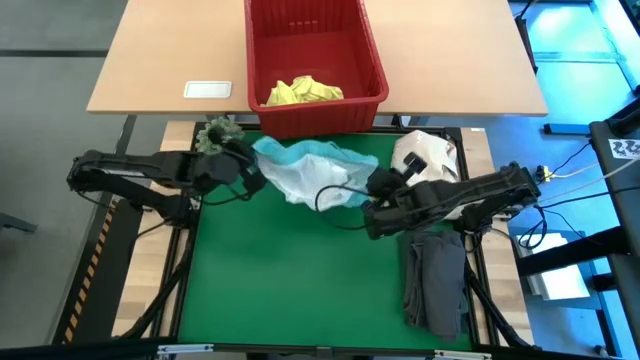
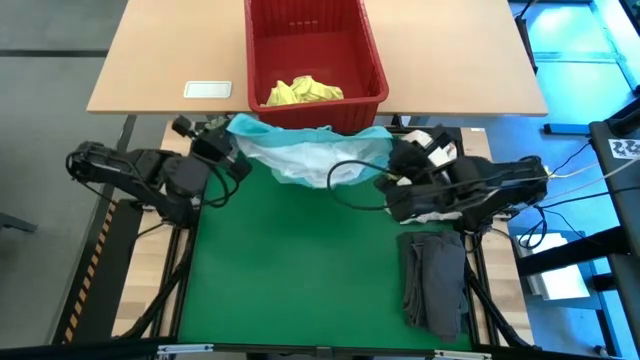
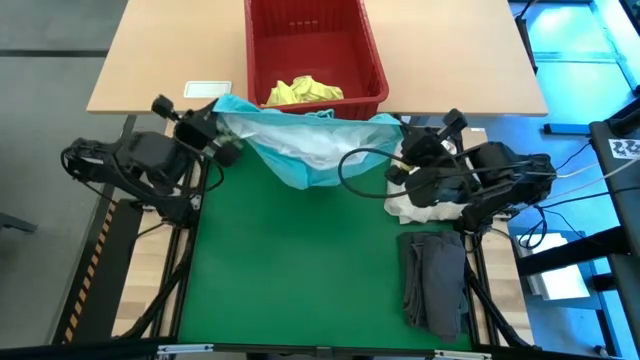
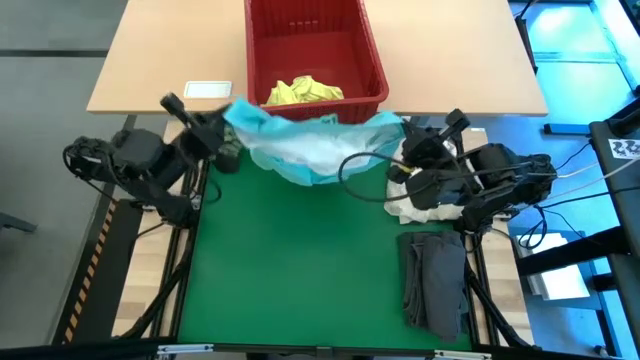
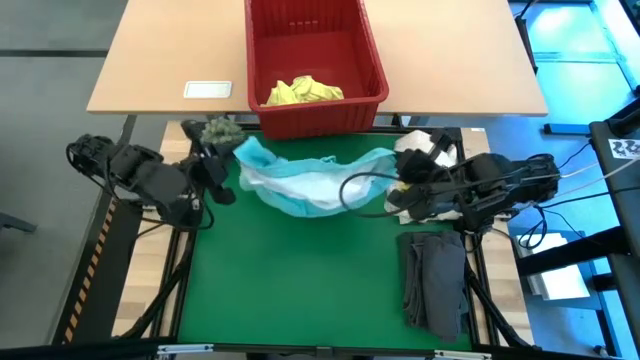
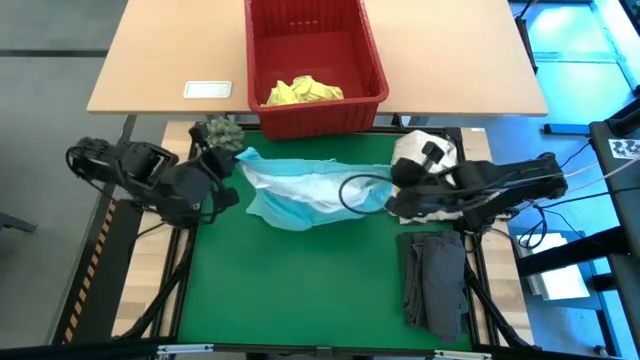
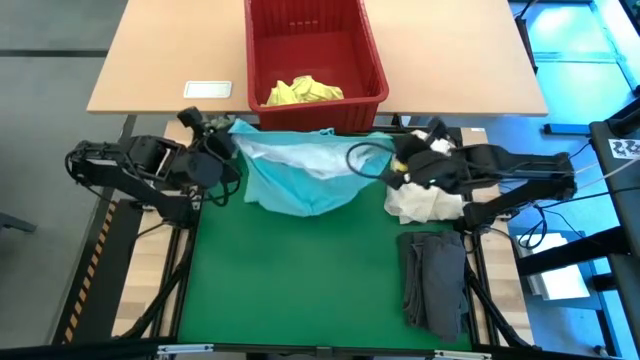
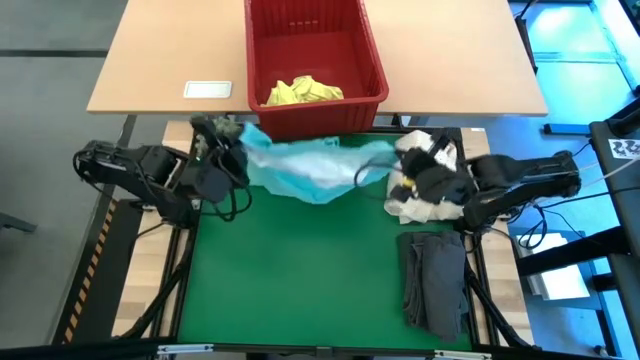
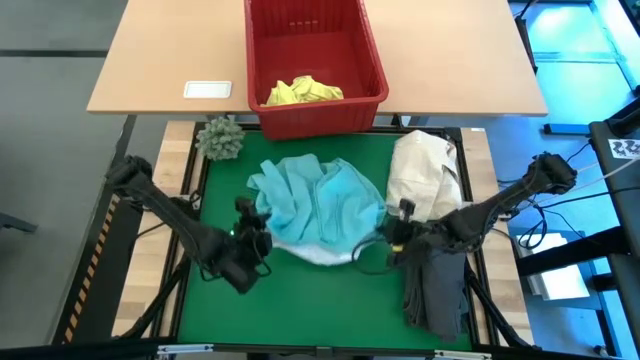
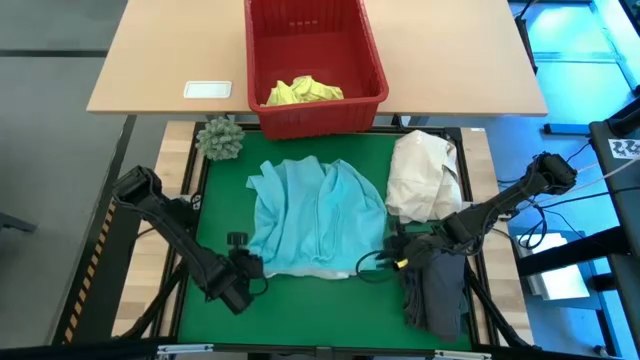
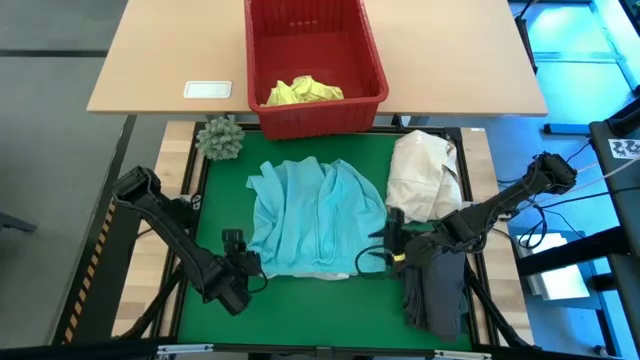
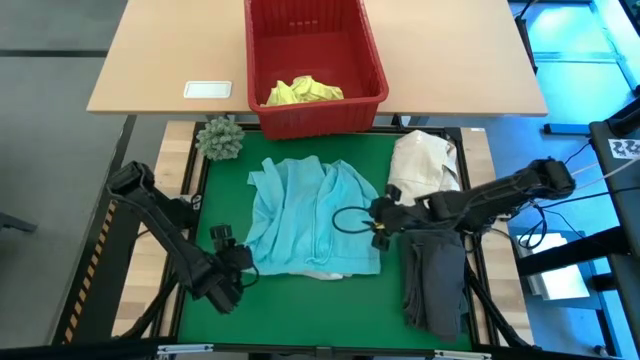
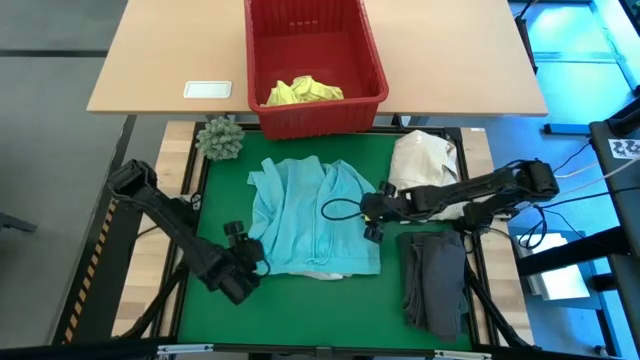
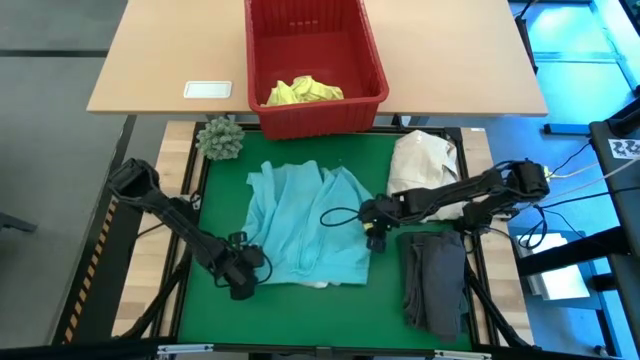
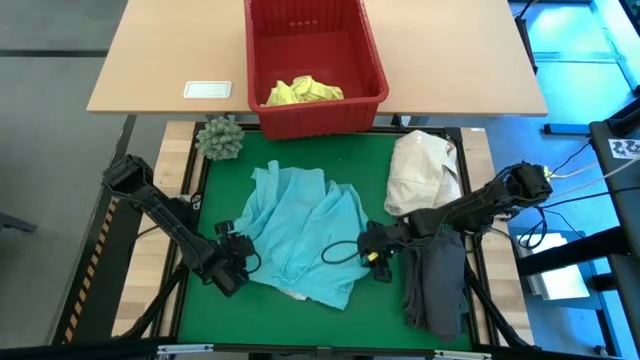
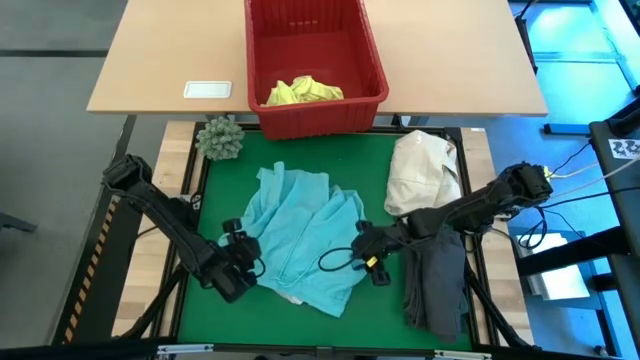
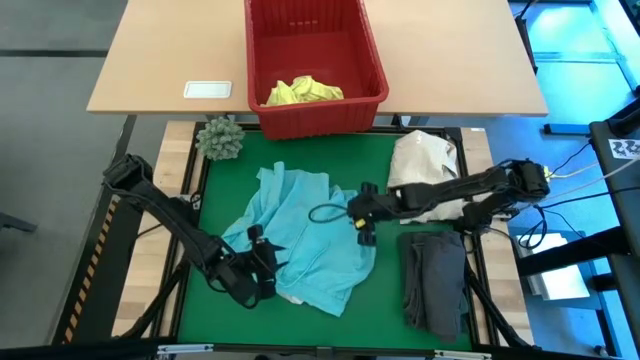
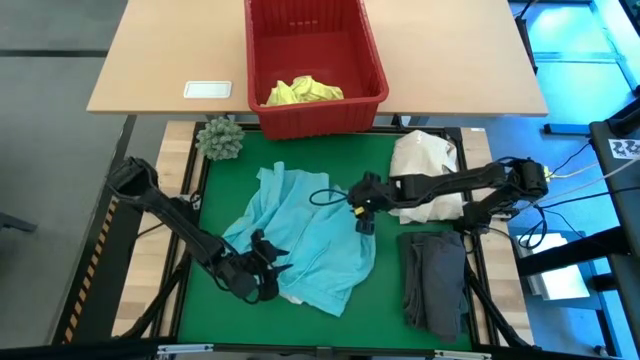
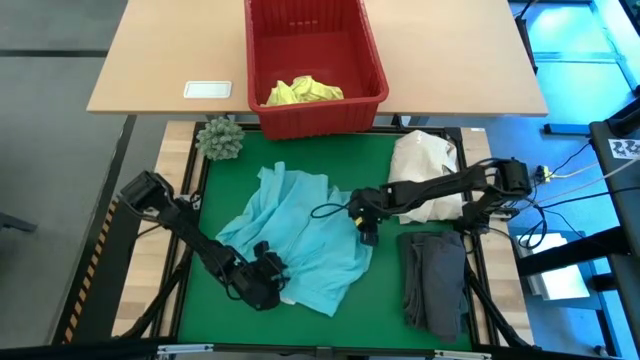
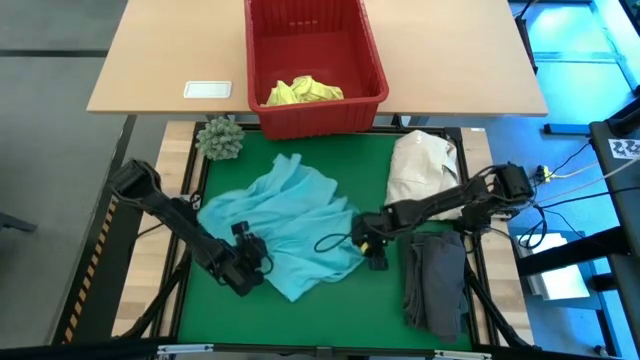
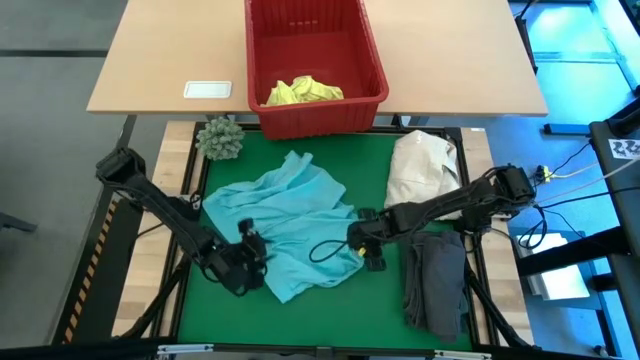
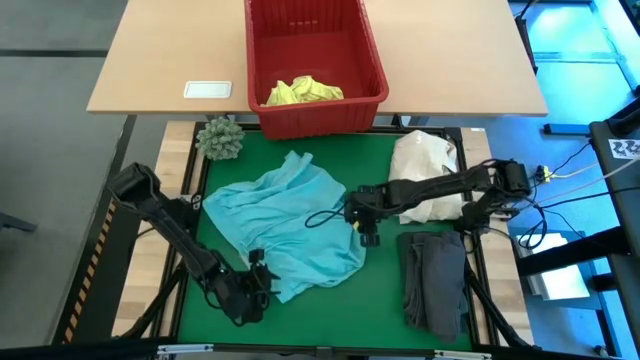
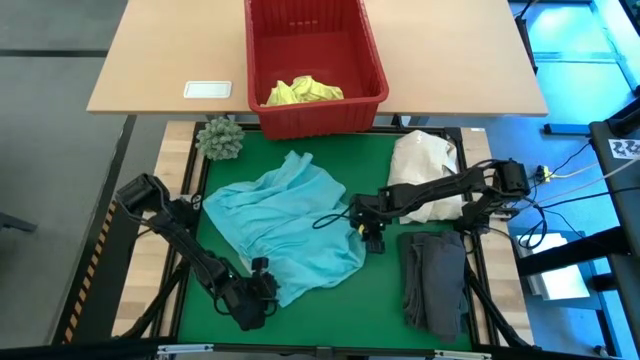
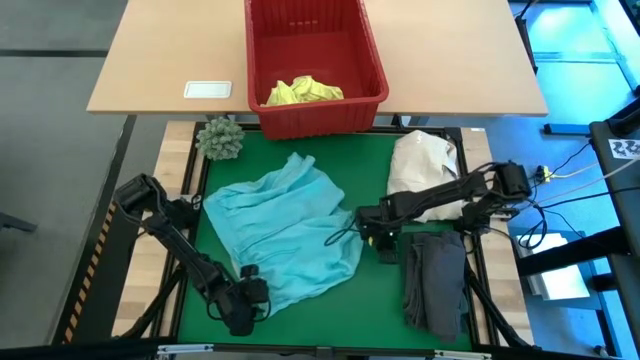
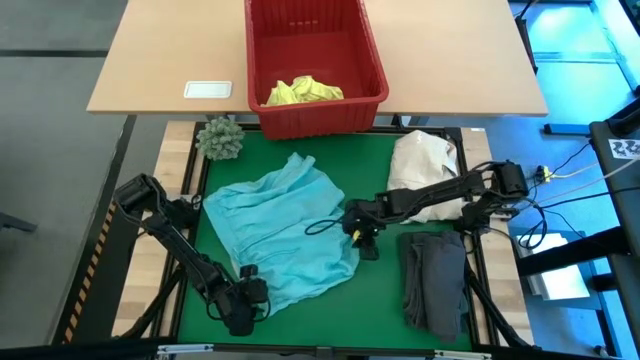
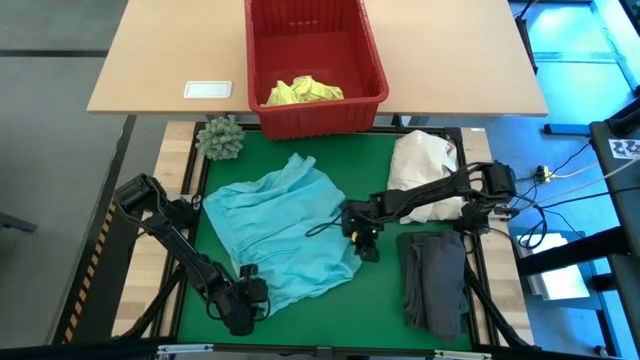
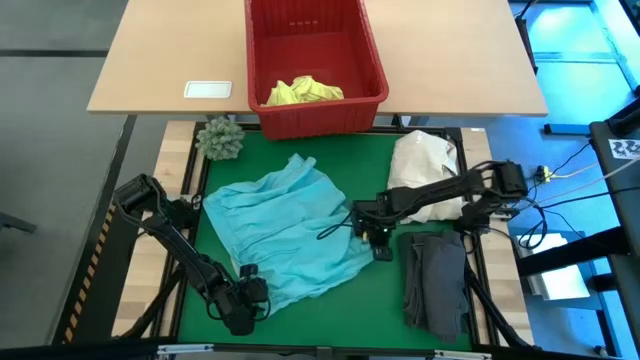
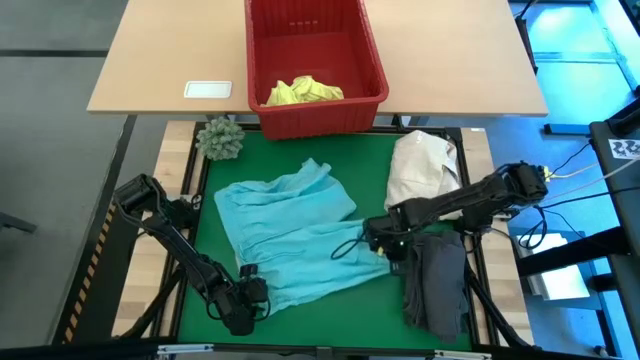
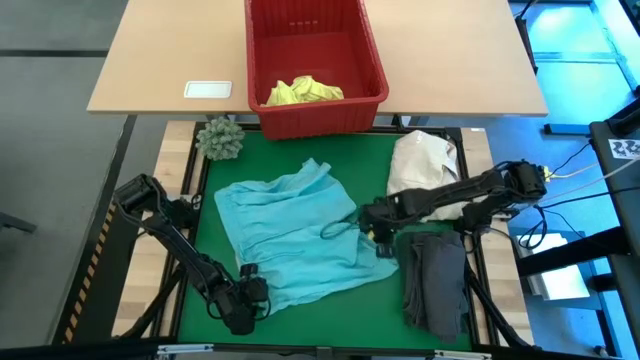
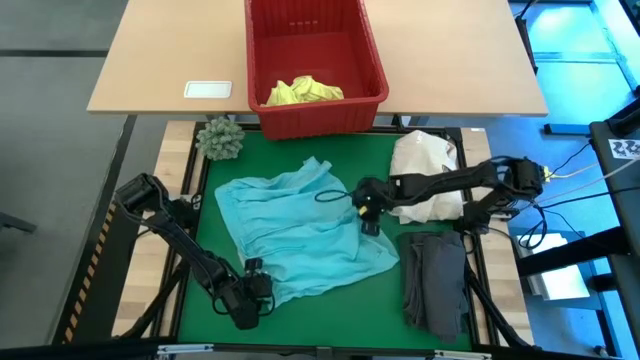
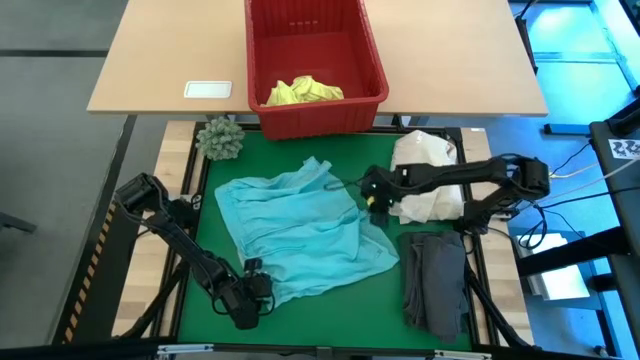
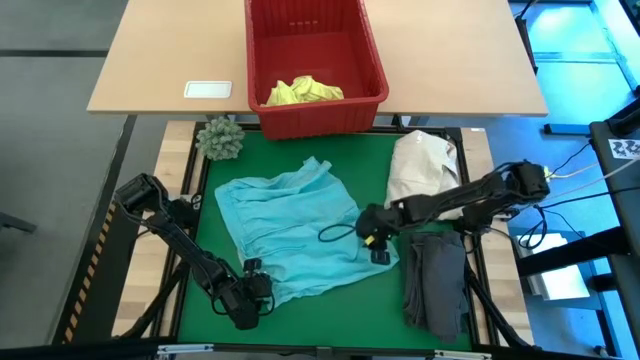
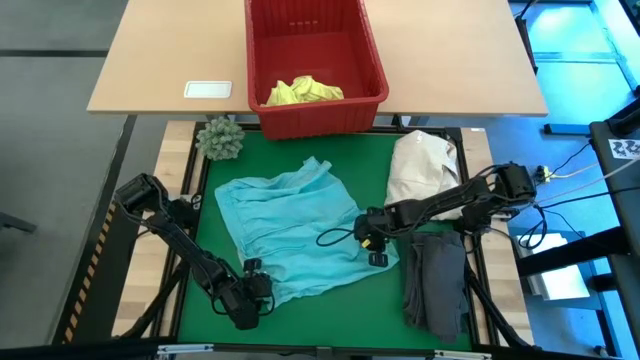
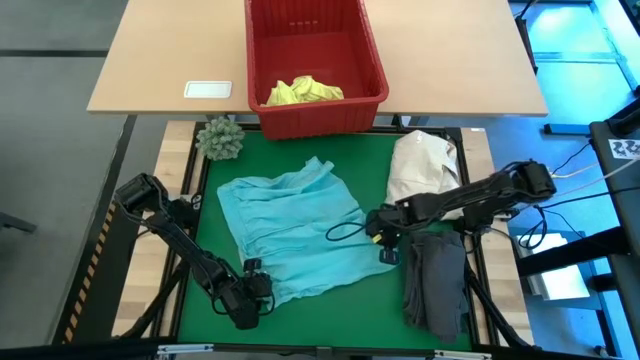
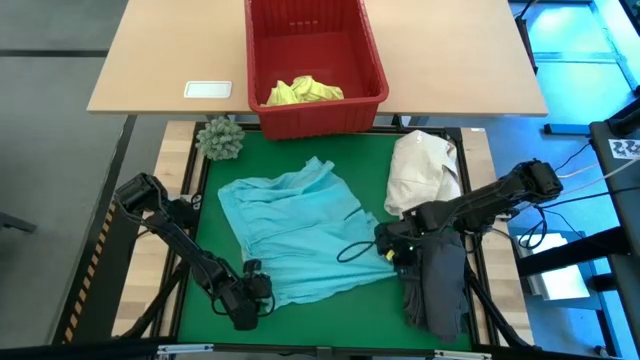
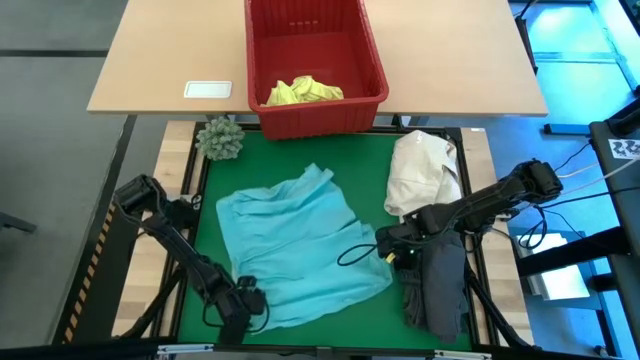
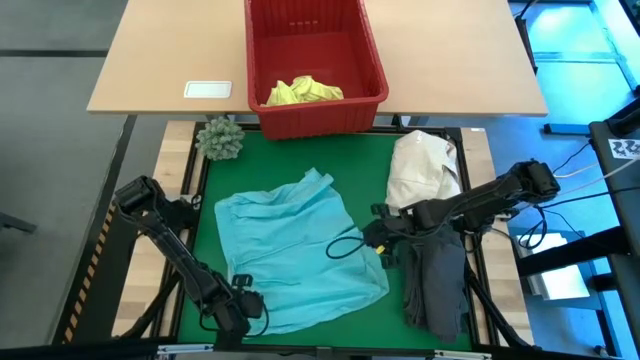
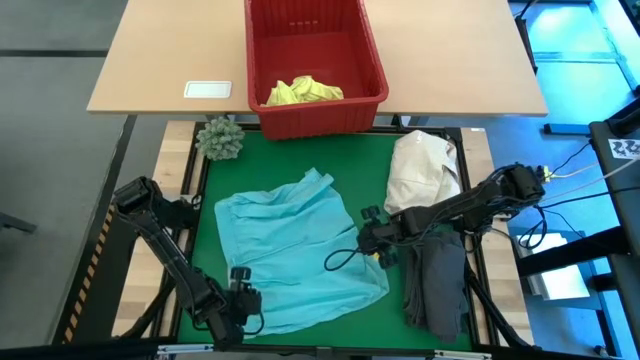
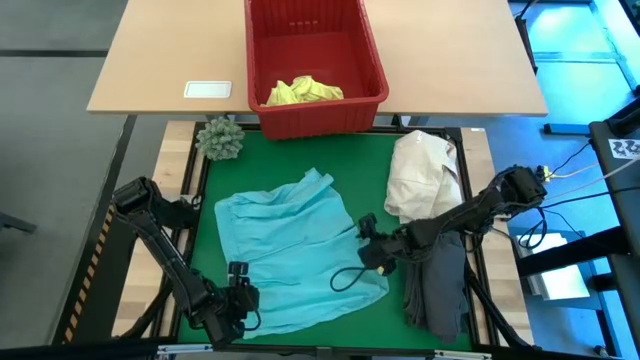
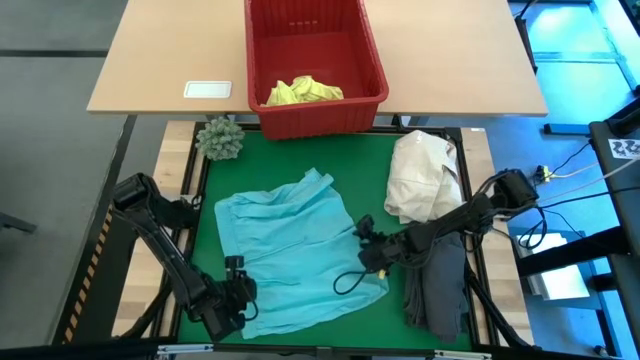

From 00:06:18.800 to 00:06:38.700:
Task: Fold Laundry from Bin
Fold the blue short

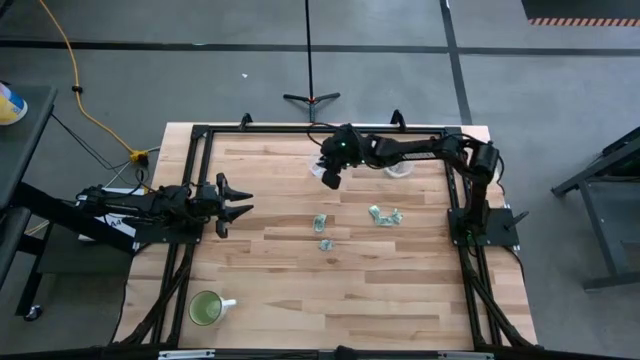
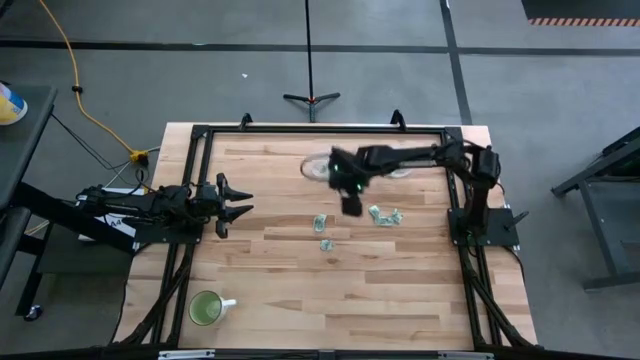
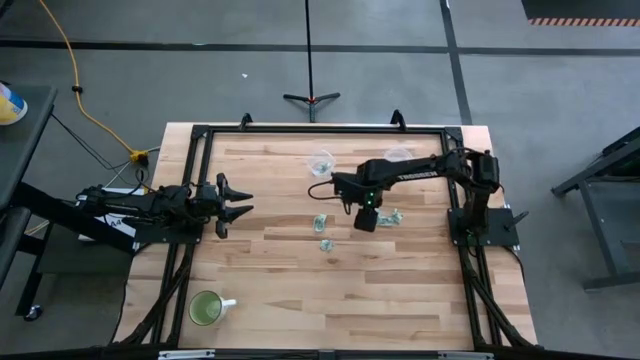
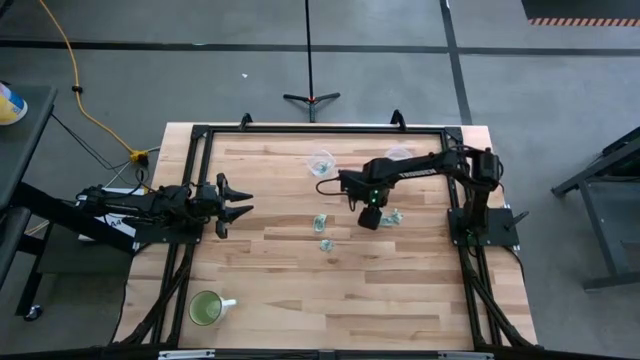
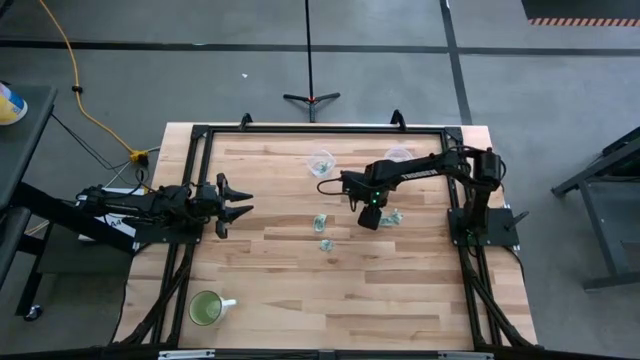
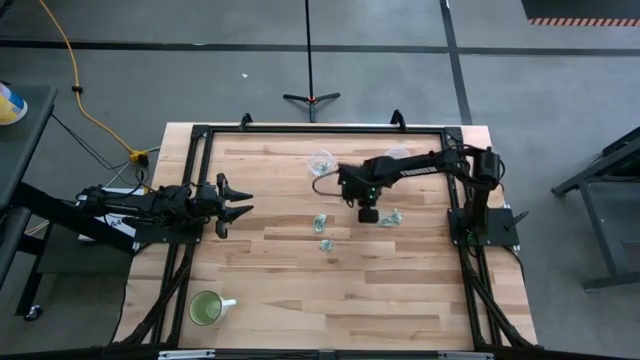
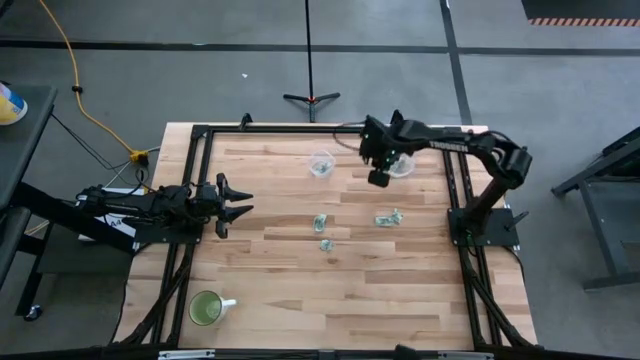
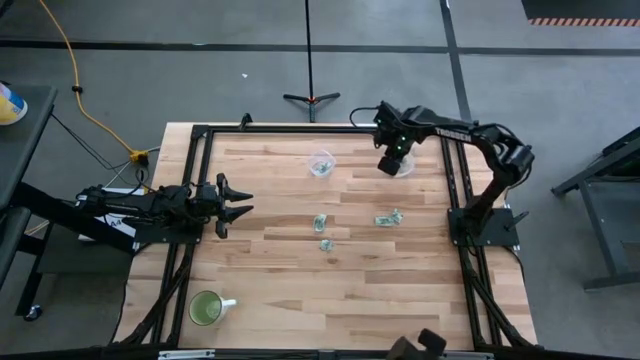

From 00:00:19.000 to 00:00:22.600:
Task: Pick and place Stevia / Truvia into bins
Put the stevia packet into the right transparent container
